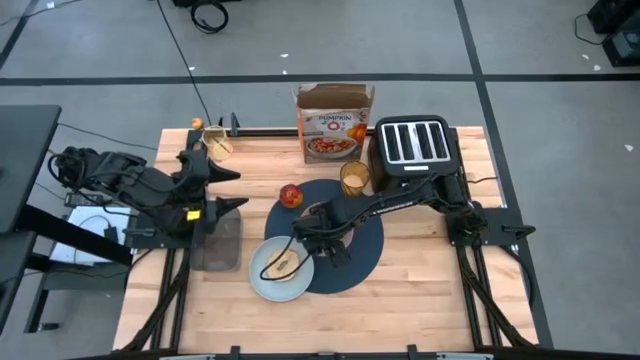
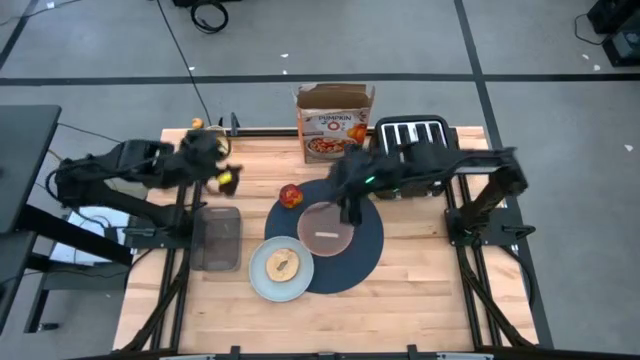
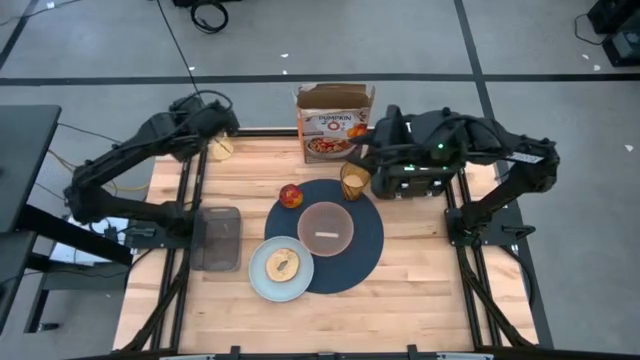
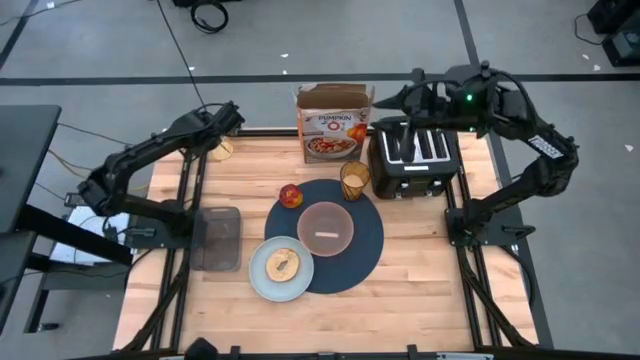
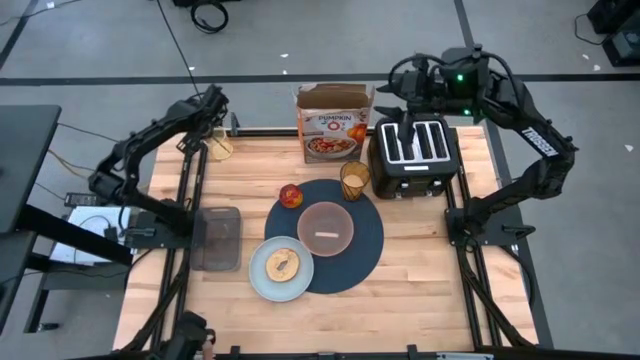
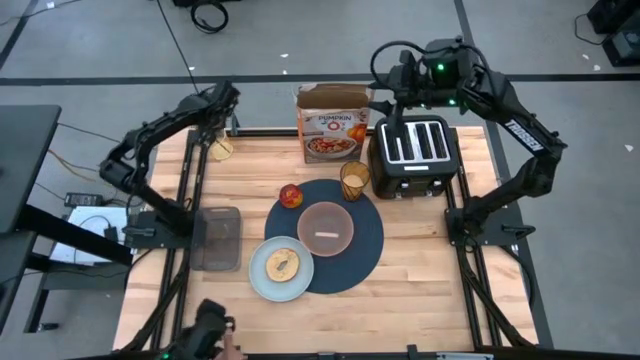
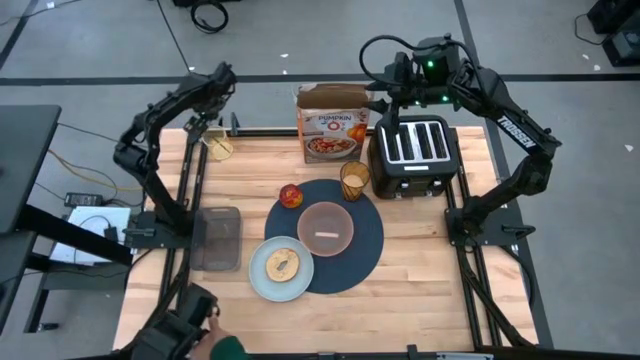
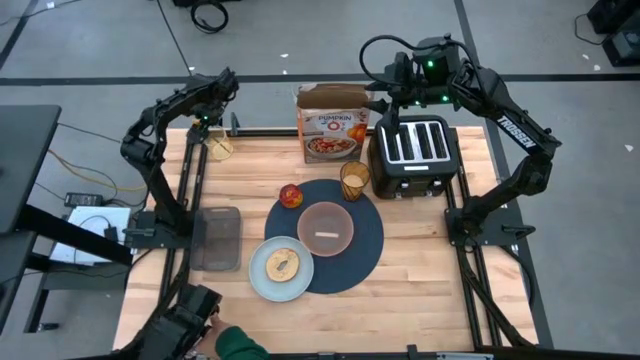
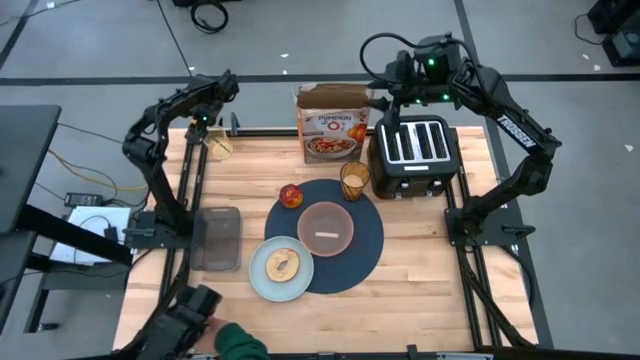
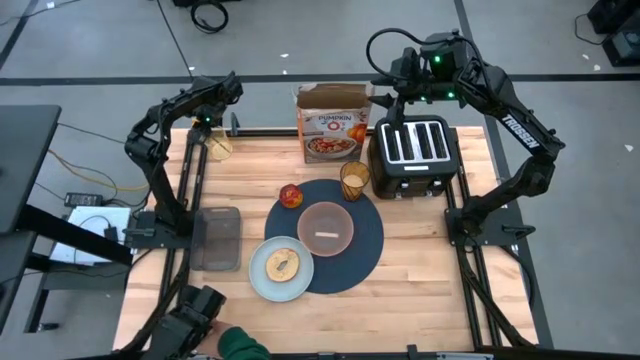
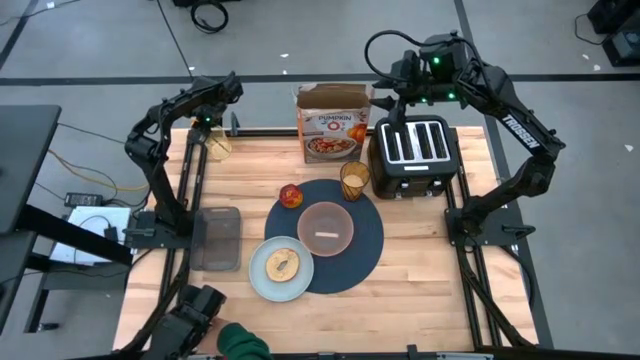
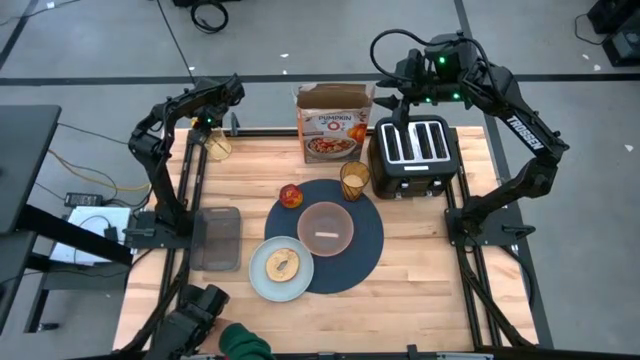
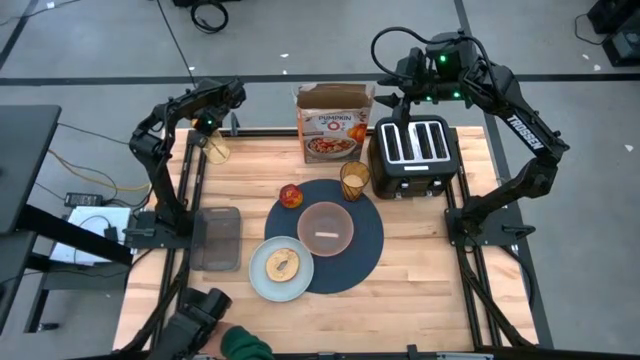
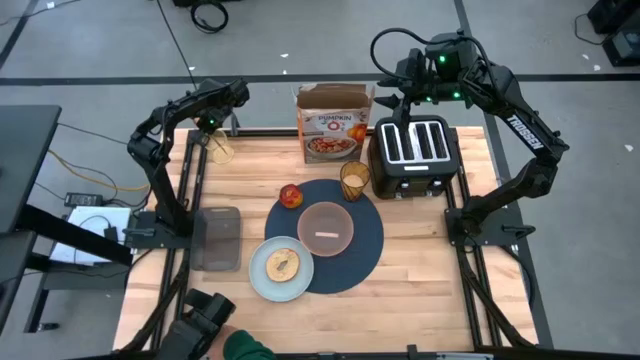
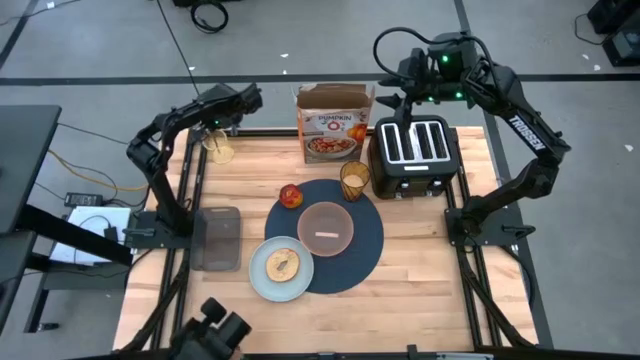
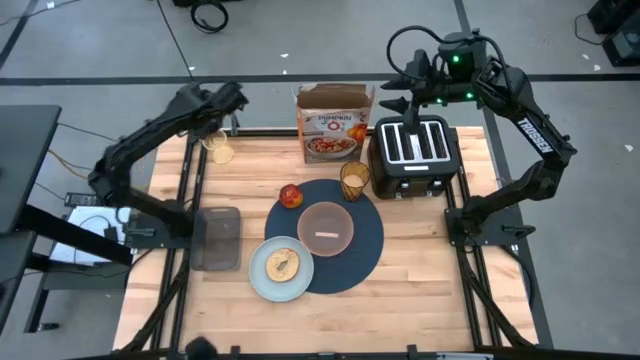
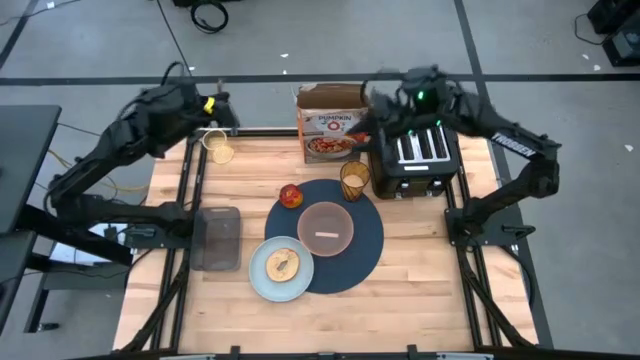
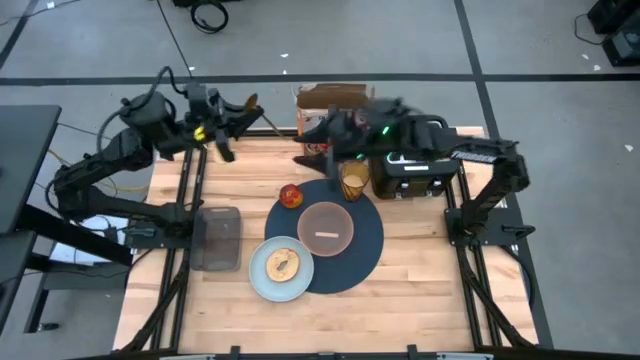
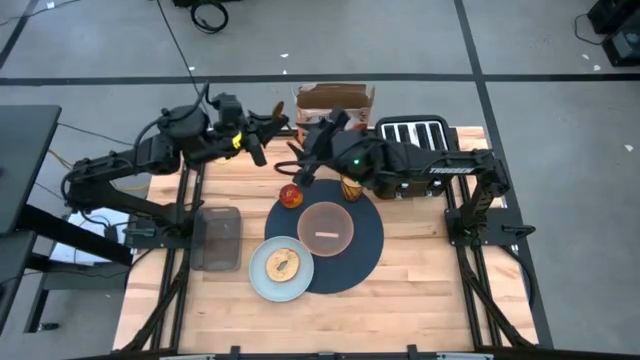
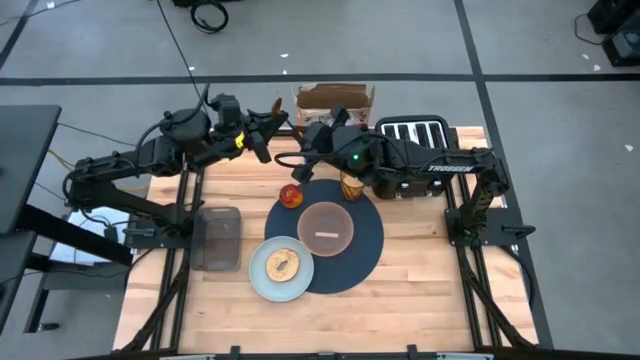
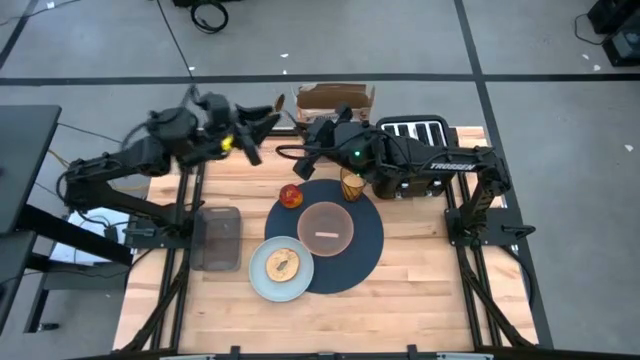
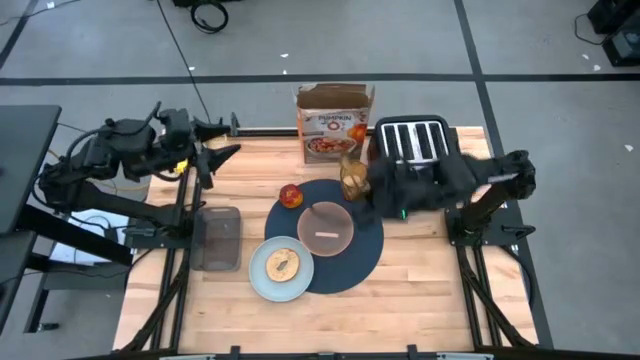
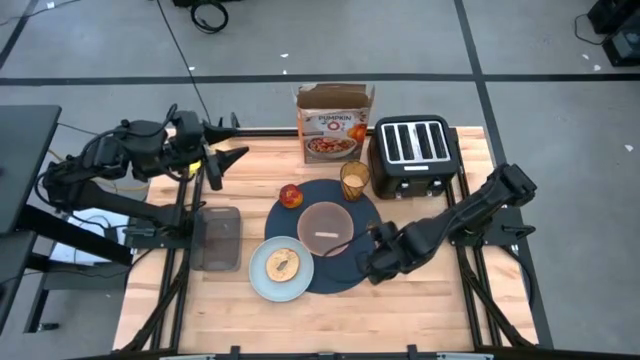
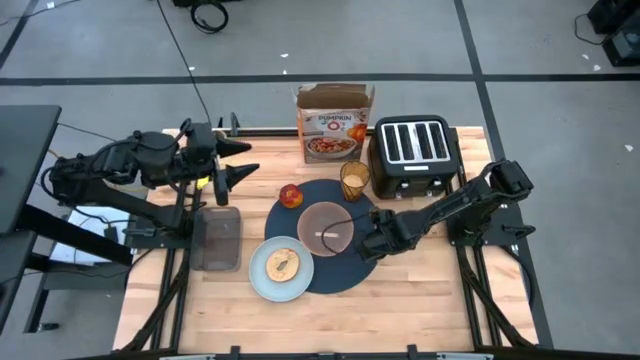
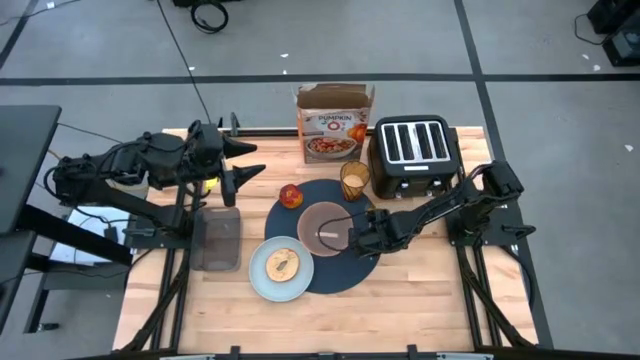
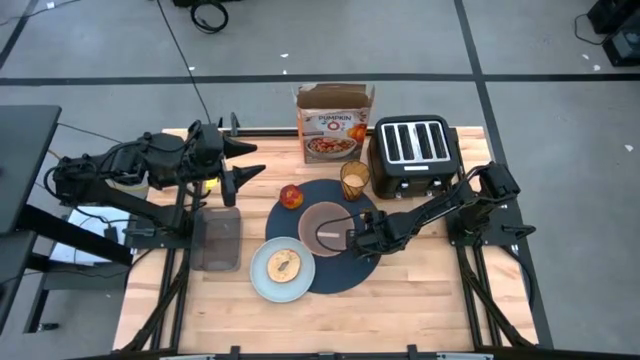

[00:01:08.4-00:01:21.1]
Task: Arrange a breakfast setting
Put the gold spoon on the dark blue tablemat

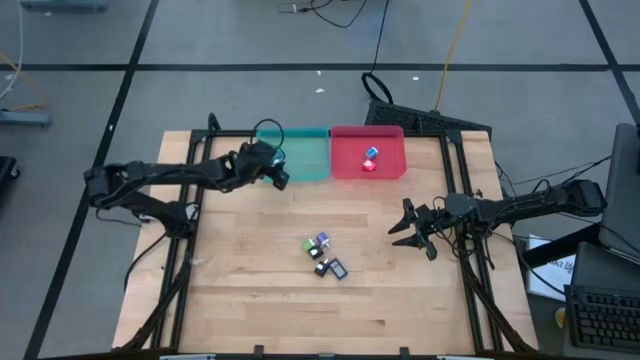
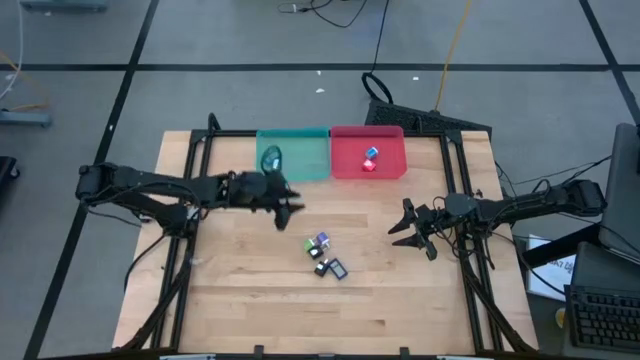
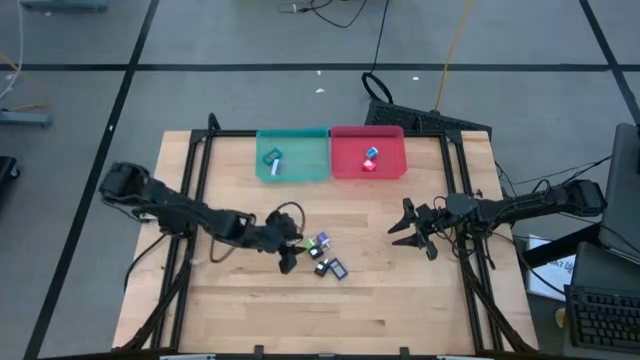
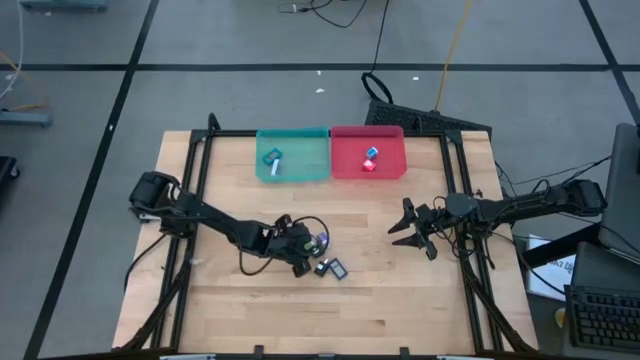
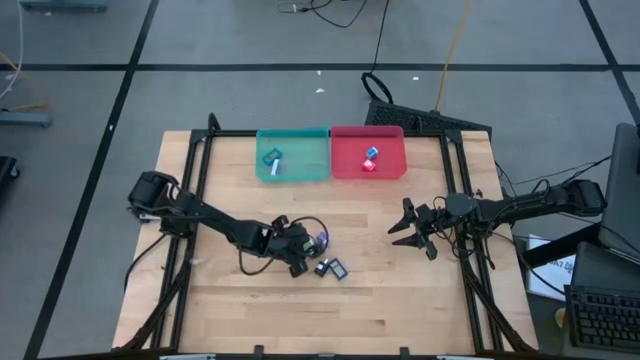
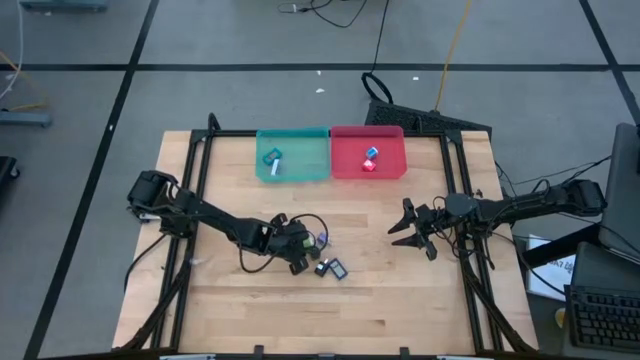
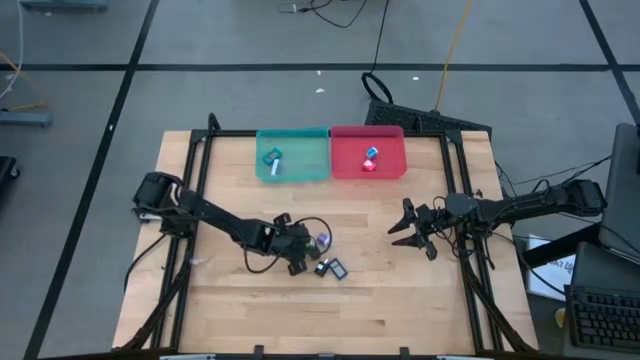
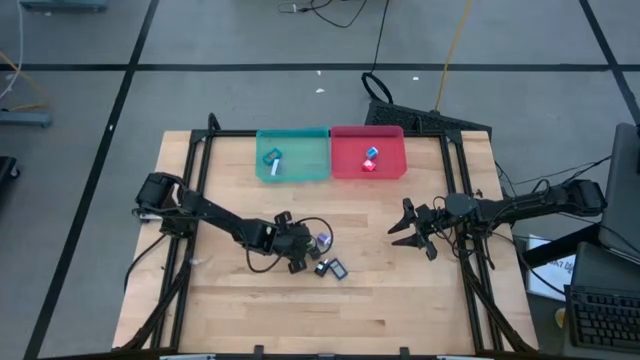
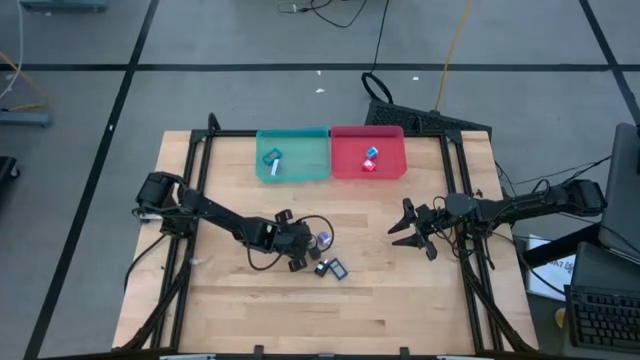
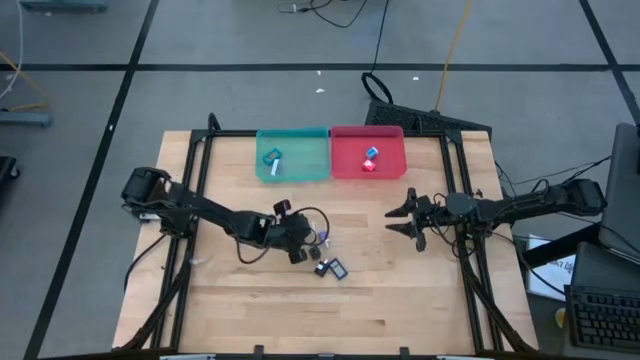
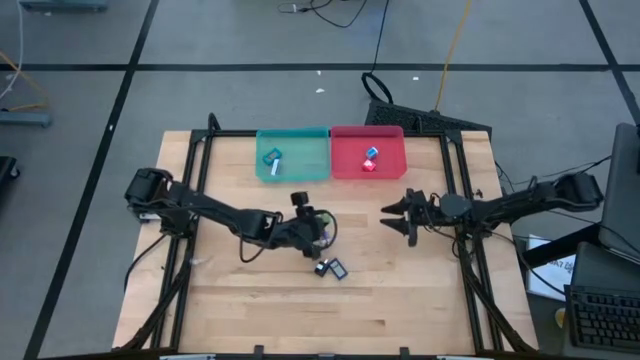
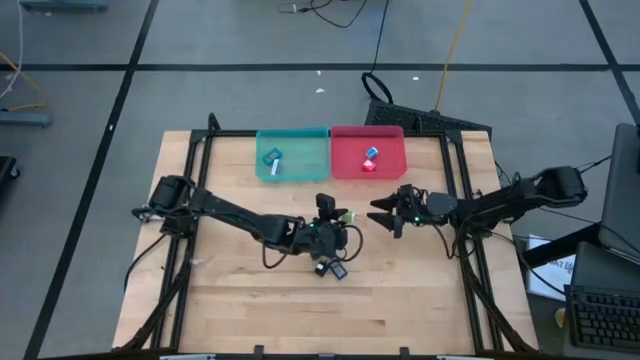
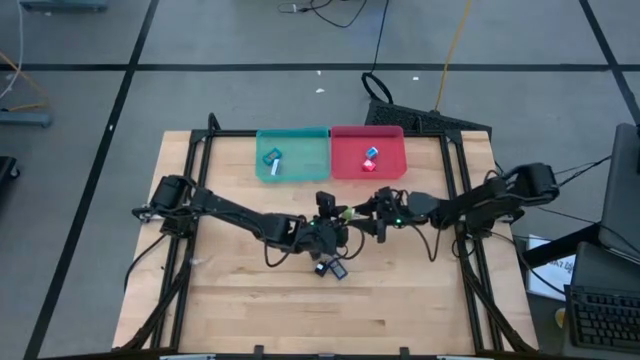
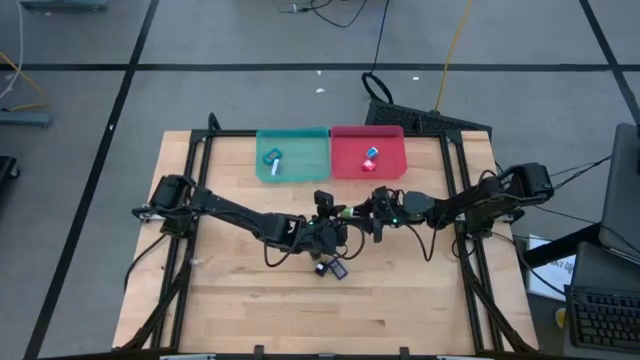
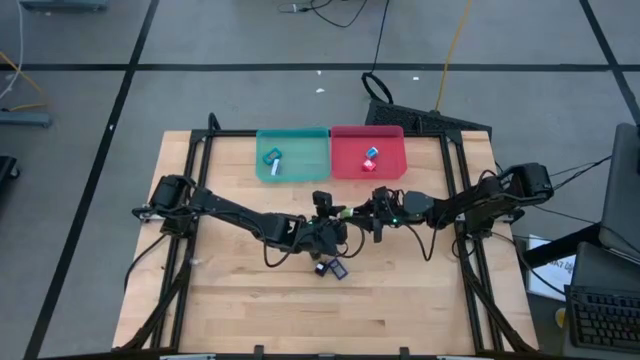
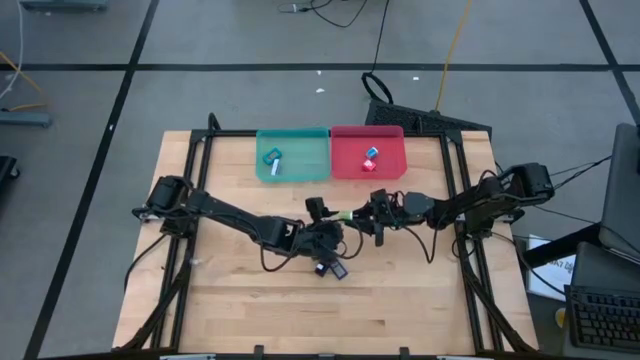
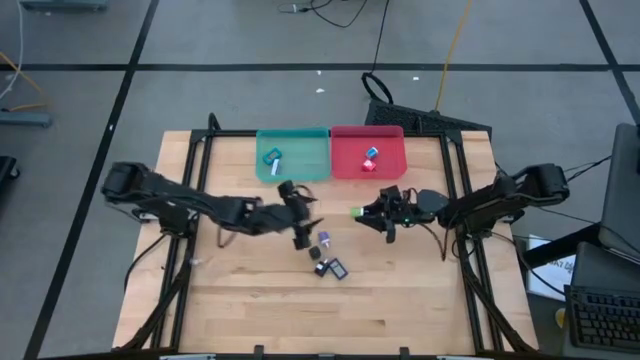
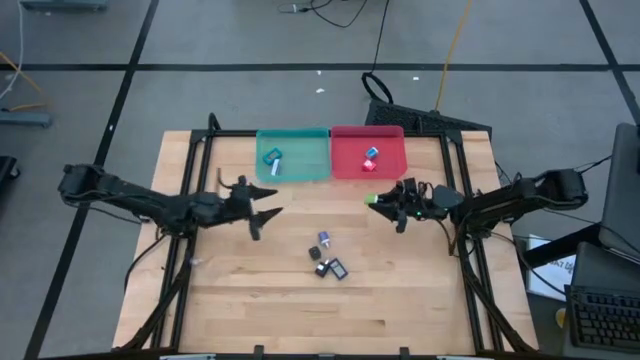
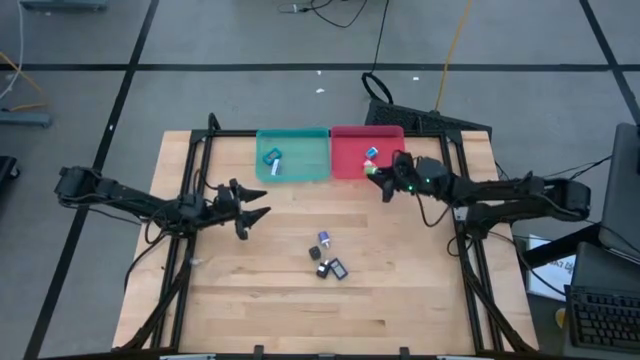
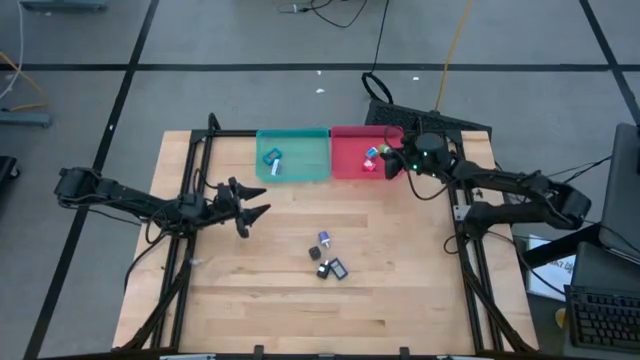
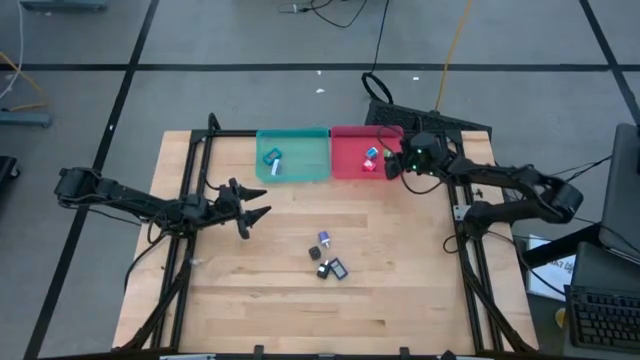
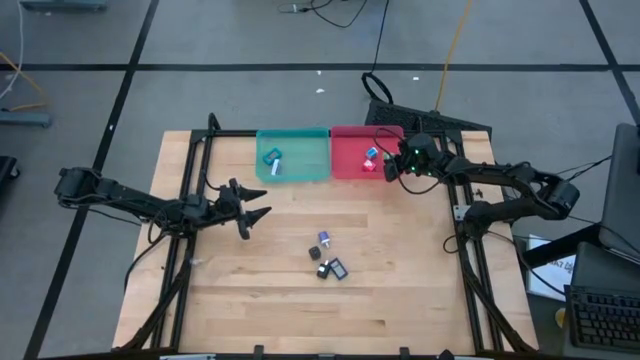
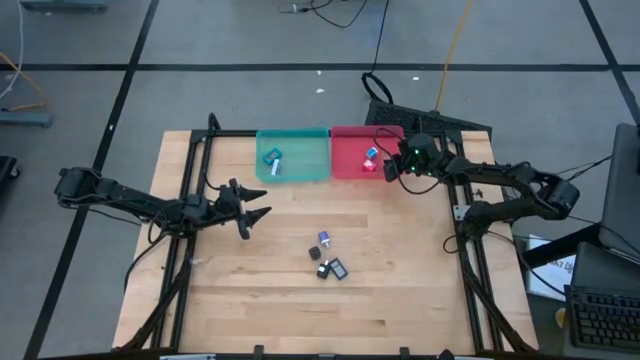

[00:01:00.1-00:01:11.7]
Task: Sort charging adapters and watches
Put the green charging adapter in the red bin
